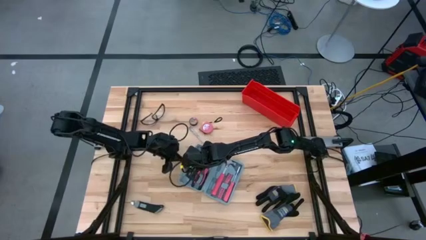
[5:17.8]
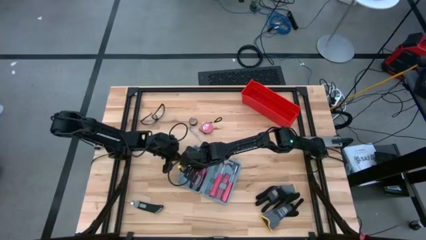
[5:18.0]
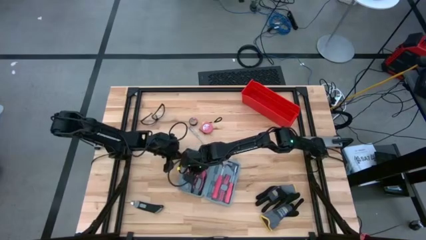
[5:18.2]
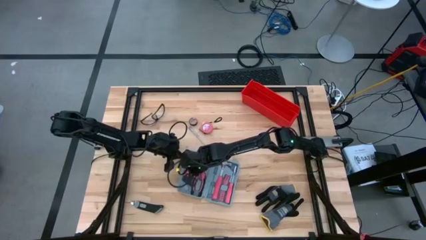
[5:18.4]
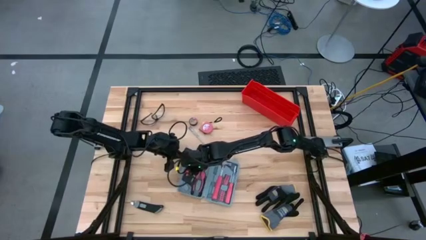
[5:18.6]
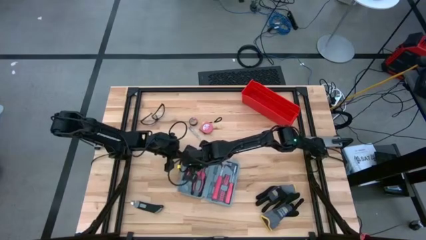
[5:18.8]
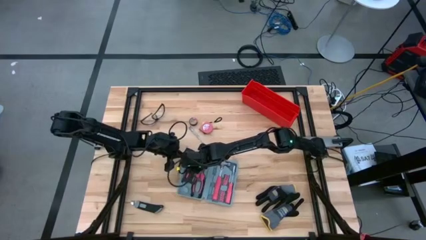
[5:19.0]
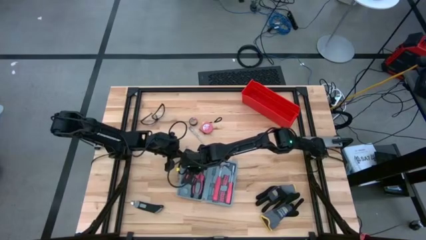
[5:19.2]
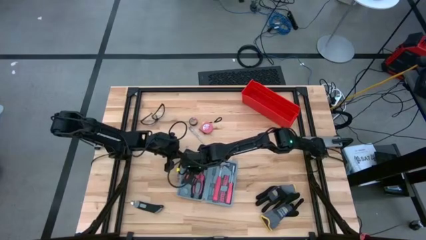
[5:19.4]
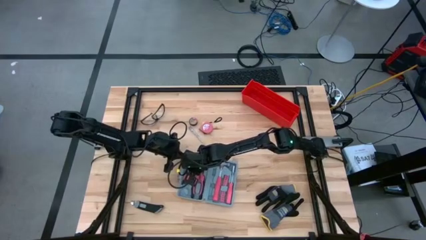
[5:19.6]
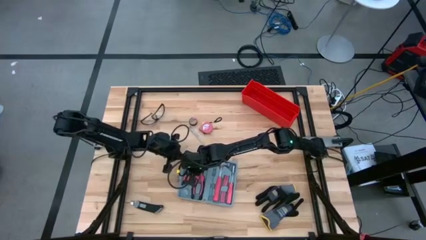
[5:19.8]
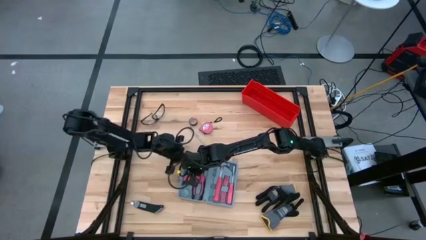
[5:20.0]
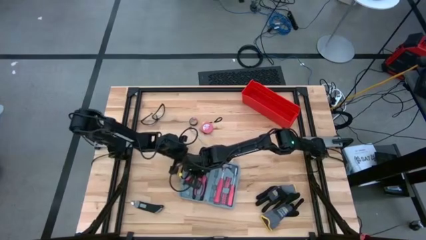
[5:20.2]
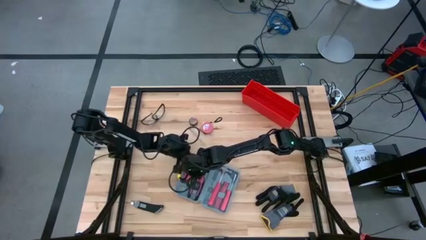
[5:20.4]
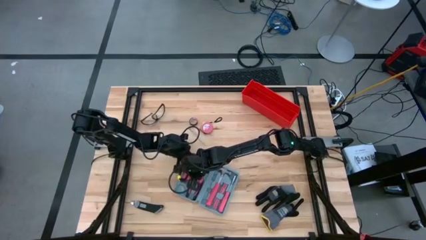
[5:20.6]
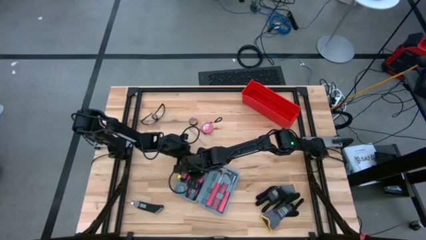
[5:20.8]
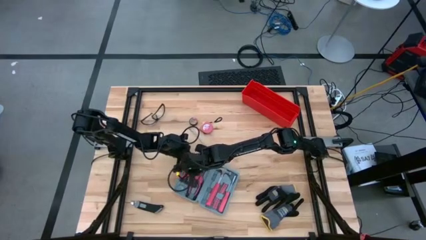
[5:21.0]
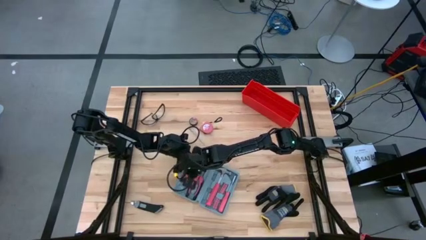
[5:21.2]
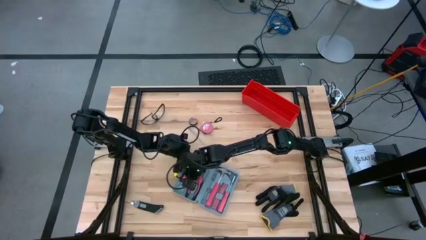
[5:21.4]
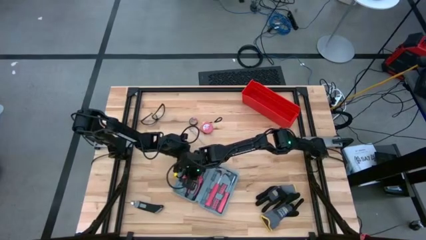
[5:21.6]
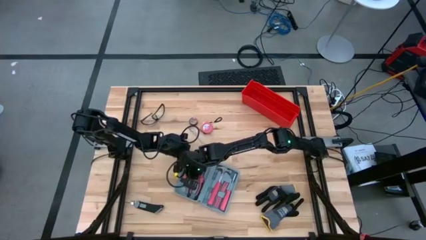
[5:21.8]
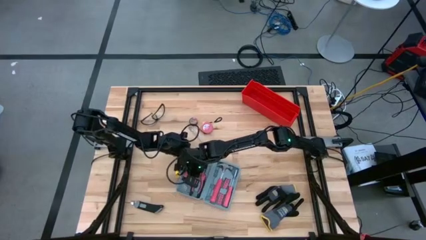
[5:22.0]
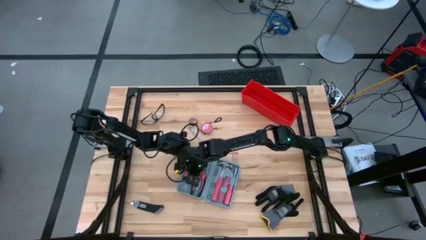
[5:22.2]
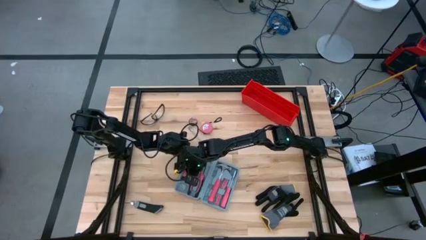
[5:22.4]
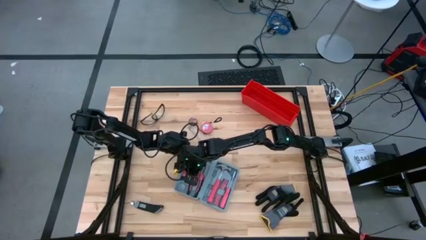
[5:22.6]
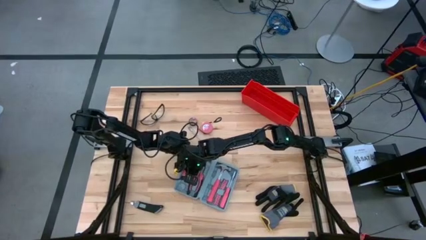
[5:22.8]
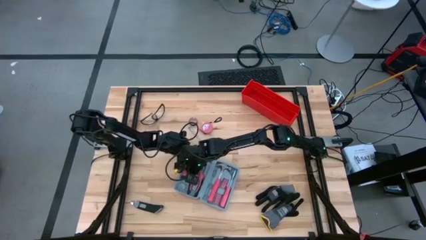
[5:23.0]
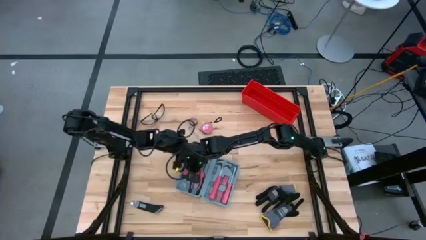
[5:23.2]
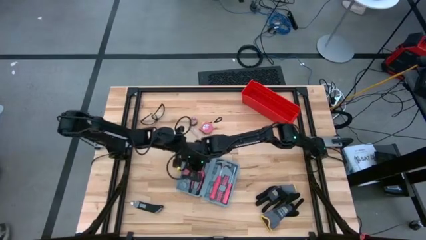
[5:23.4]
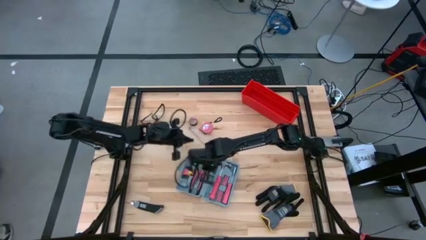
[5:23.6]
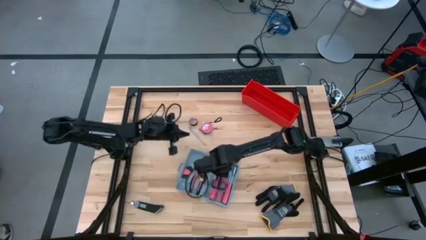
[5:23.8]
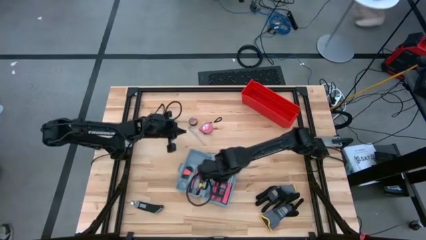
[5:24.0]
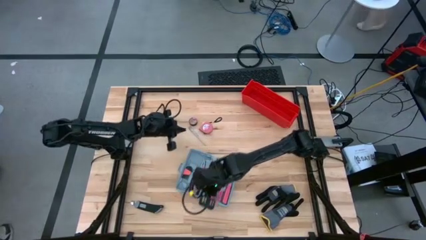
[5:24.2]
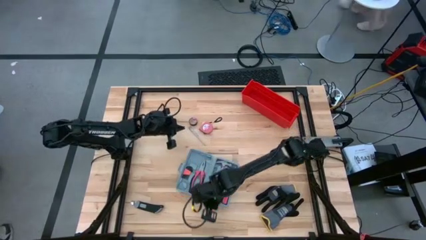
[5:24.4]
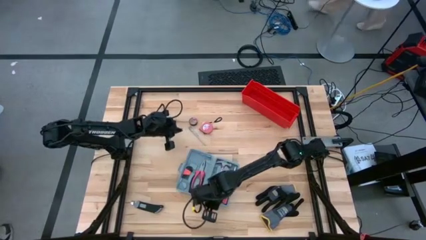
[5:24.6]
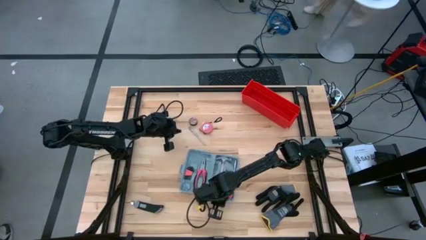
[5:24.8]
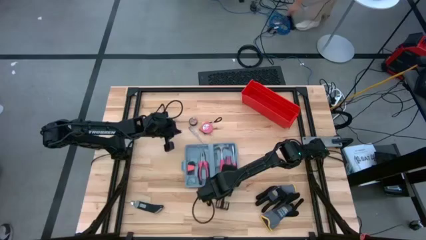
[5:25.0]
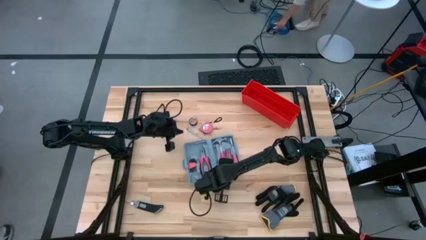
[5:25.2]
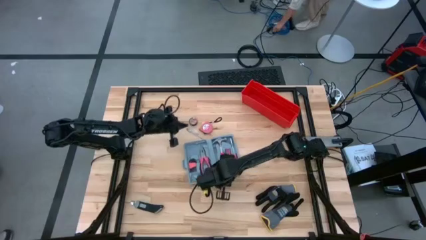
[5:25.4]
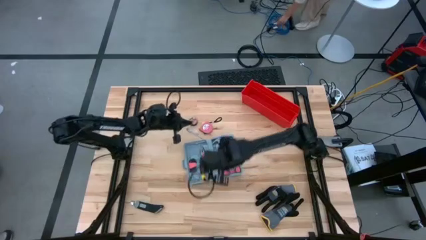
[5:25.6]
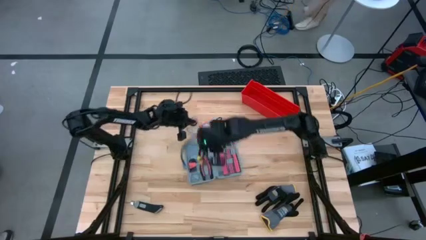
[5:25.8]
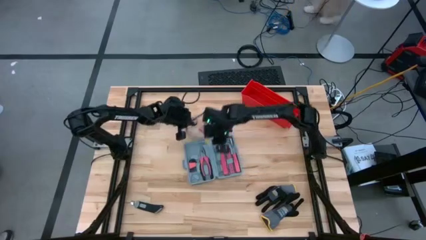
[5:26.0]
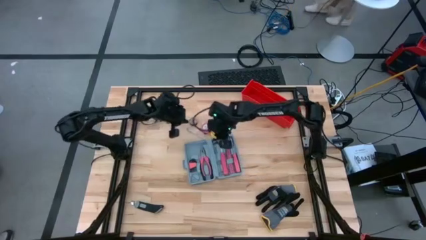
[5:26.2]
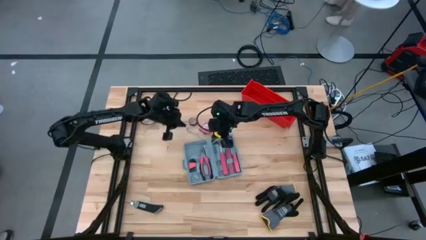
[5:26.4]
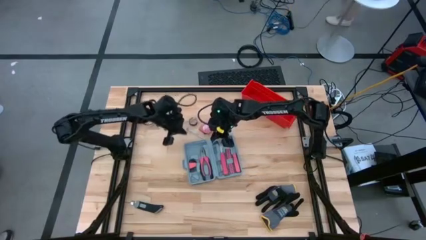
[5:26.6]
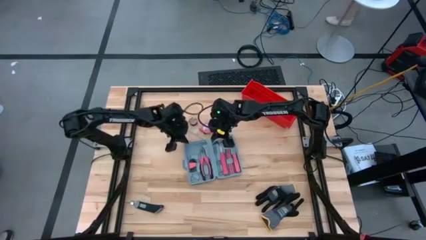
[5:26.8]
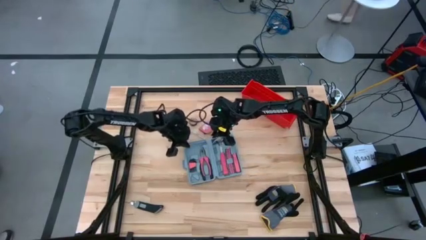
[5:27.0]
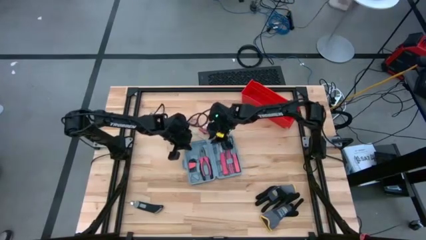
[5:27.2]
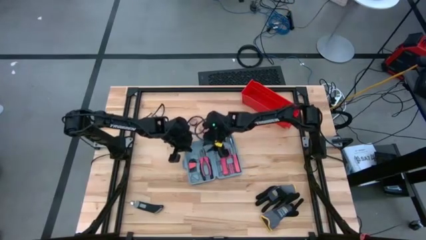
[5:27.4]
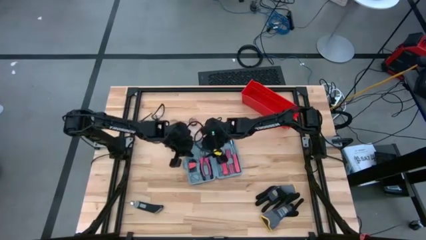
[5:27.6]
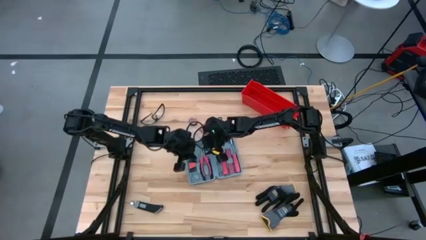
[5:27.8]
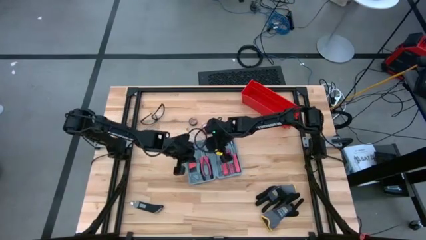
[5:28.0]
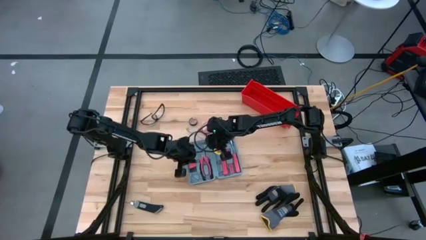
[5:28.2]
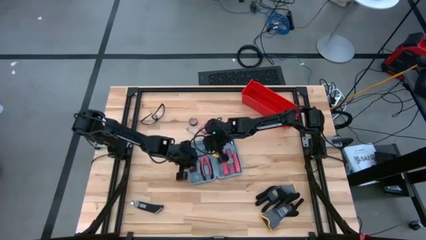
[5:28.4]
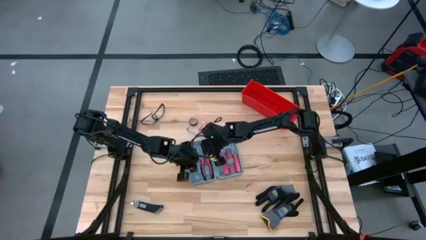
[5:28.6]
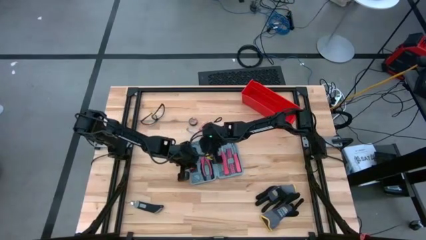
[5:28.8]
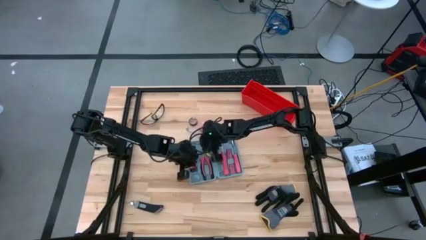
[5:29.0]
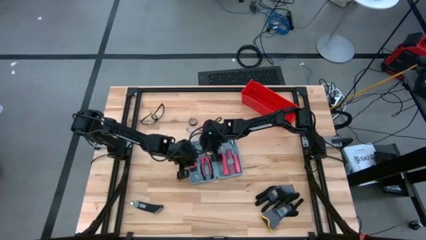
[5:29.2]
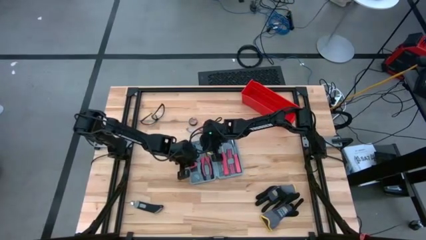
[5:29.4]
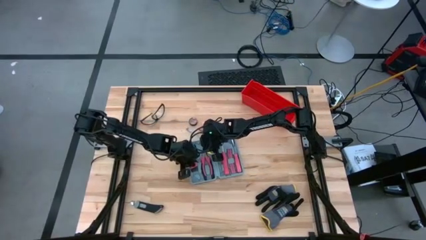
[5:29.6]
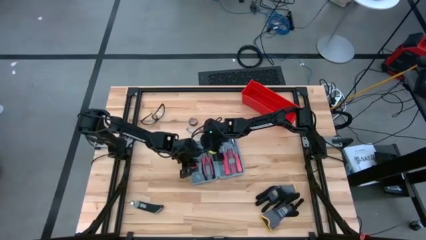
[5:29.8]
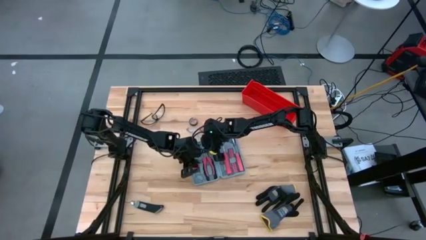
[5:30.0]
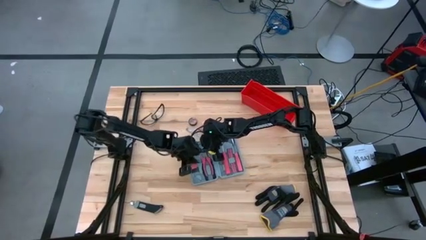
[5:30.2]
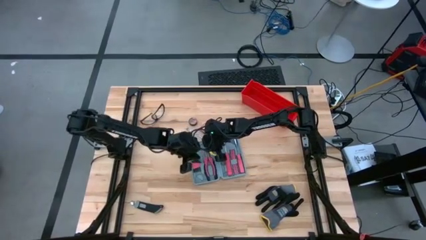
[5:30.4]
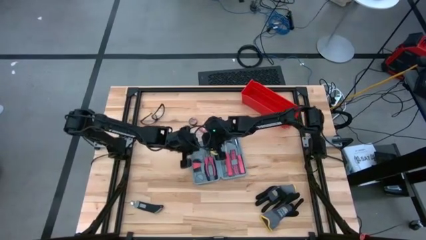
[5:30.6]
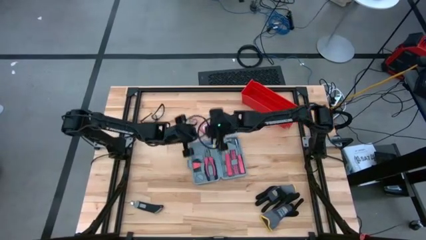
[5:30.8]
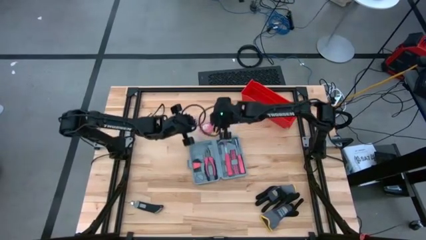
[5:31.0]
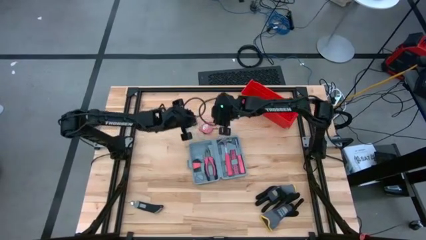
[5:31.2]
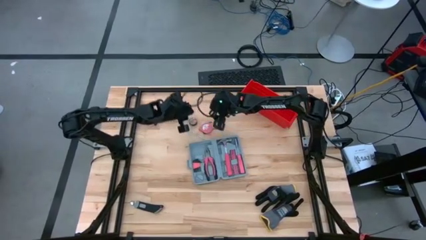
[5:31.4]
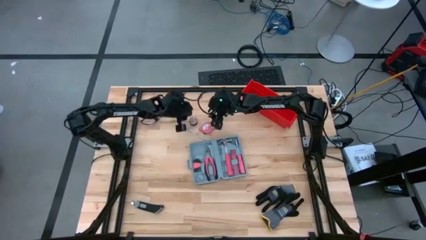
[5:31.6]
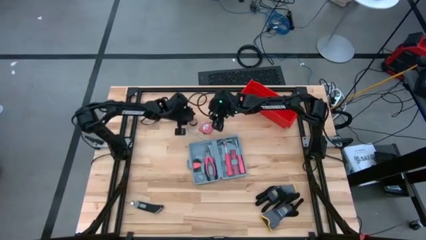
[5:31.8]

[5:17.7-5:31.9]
Task: prefit tool cases
Adjust the hex key on the toolbox

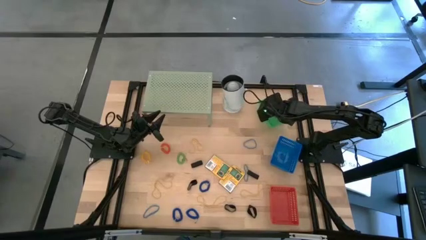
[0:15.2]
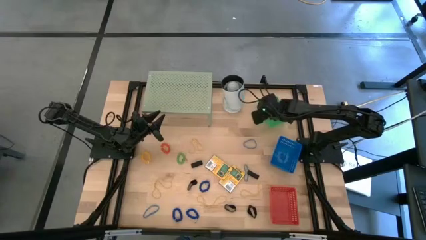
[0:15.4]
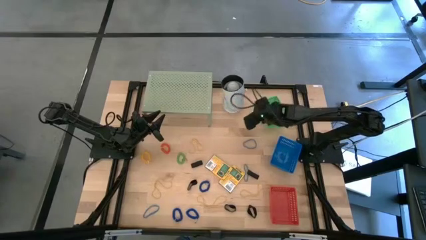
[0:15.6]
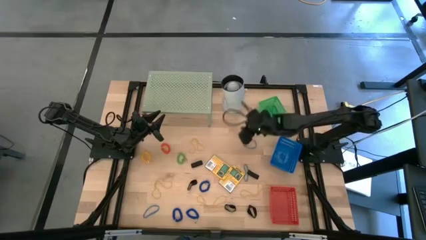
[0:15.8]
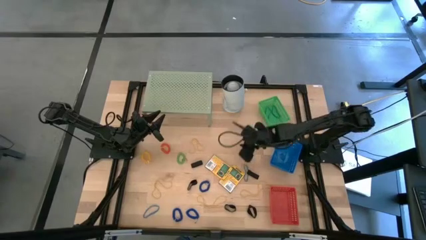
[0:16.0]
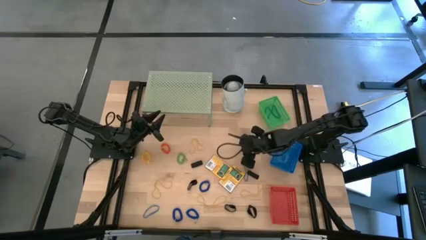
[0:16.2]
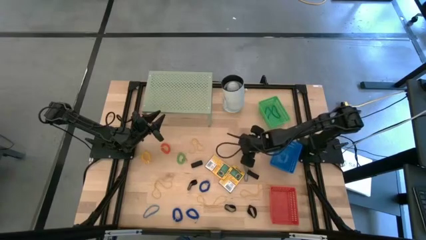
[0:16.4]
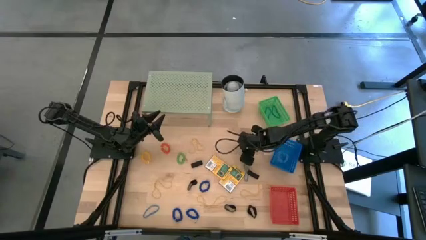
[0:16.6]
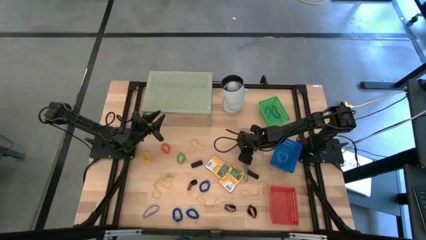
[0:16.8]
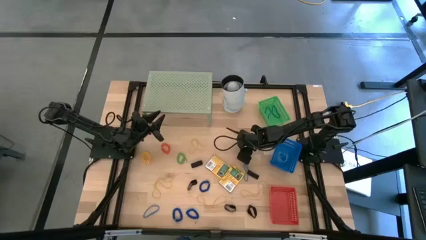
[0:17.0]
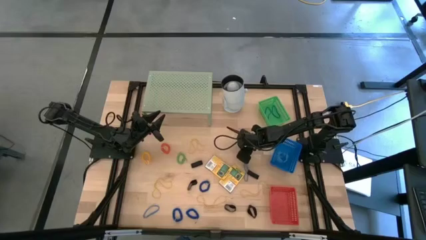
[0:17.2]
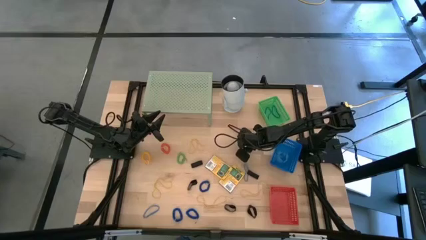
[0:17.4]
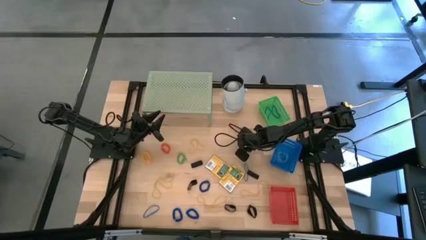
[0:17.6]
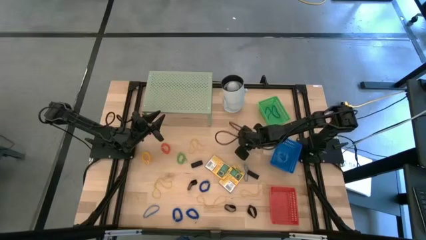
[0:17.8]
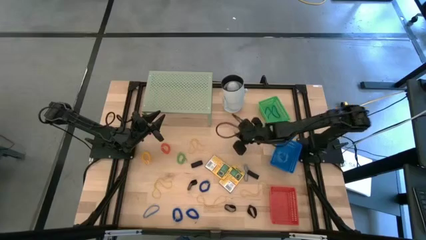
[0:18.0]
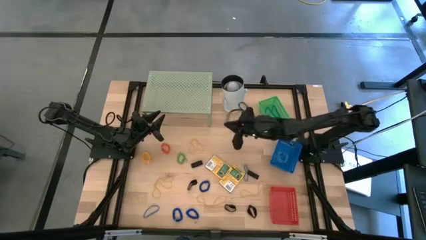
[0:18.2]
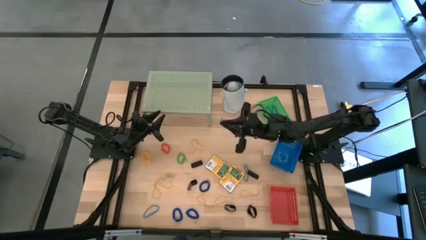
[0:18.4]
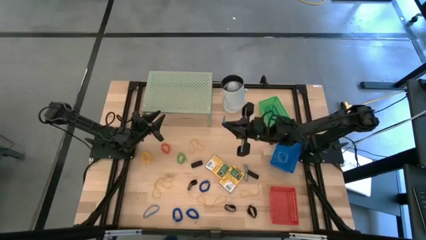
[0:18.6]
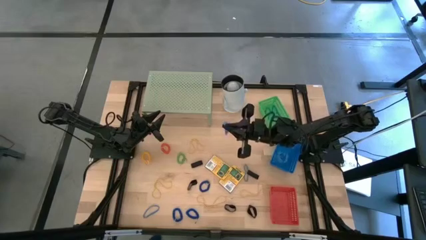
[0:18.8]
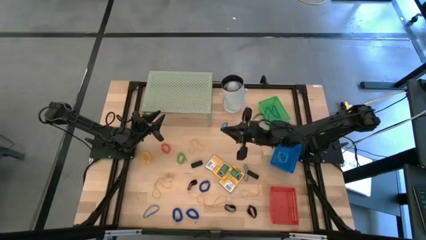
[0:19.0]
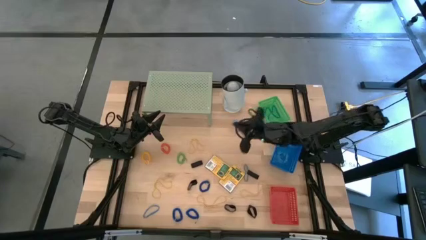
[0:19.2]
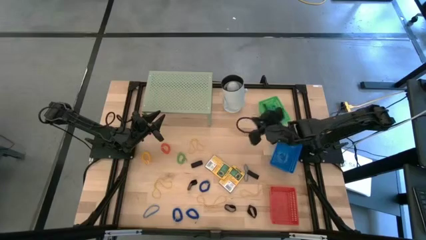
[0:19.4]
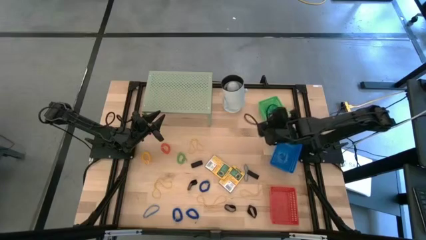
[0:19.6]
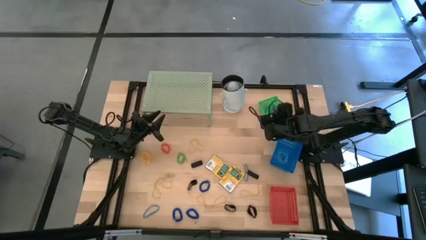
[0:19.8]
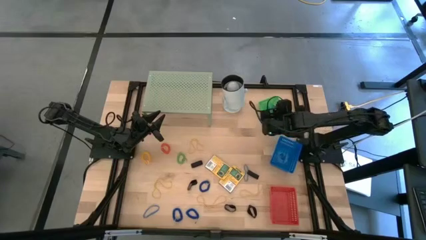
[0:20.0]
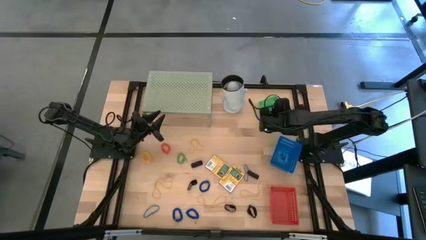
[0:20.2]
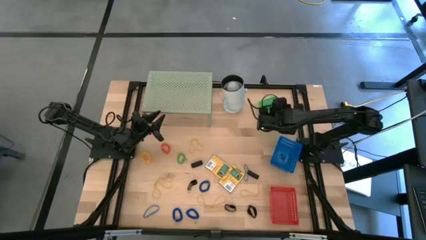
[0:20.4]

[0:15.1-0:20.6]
Task: Pick & Place Office Desk Supplies
Put the blue rubber band into the green bin
